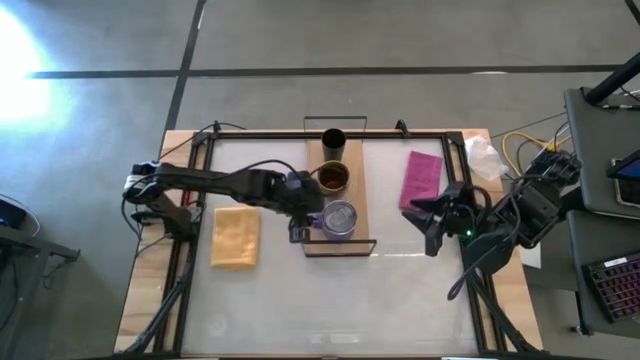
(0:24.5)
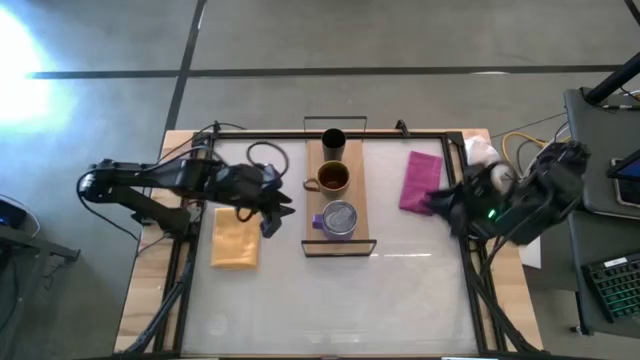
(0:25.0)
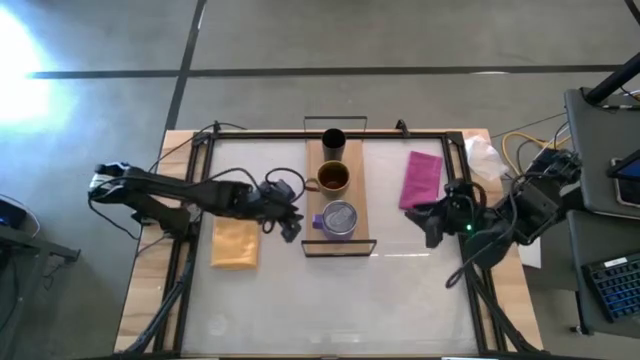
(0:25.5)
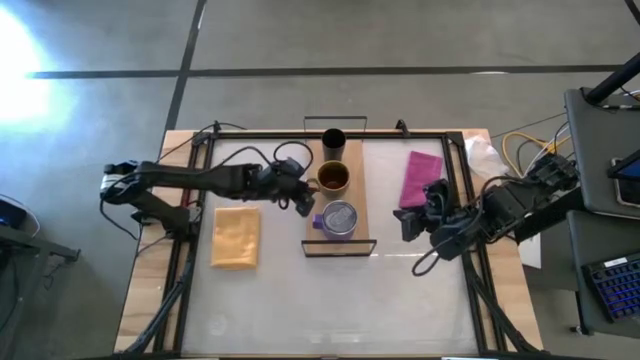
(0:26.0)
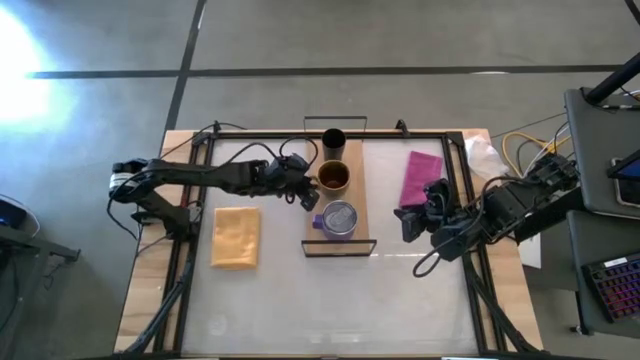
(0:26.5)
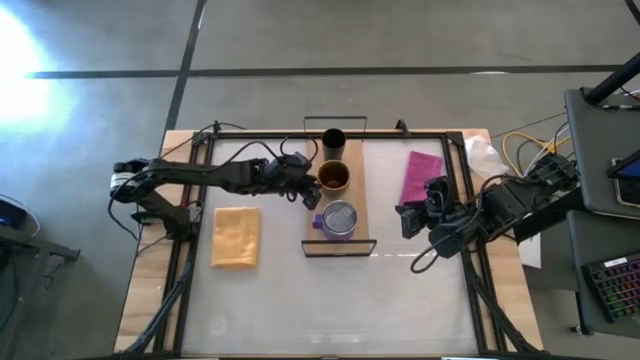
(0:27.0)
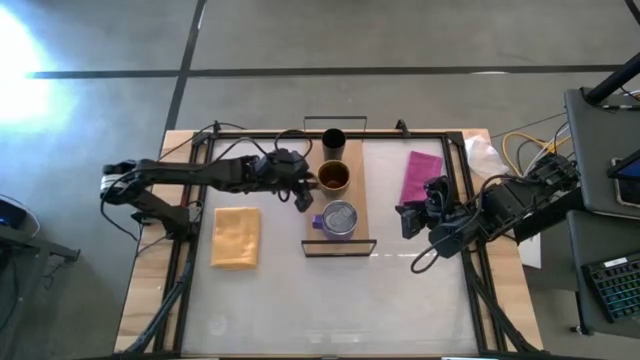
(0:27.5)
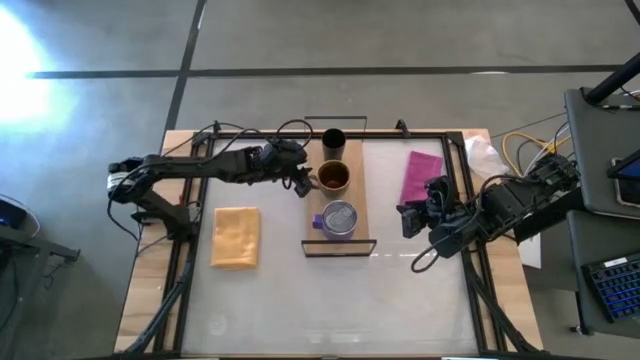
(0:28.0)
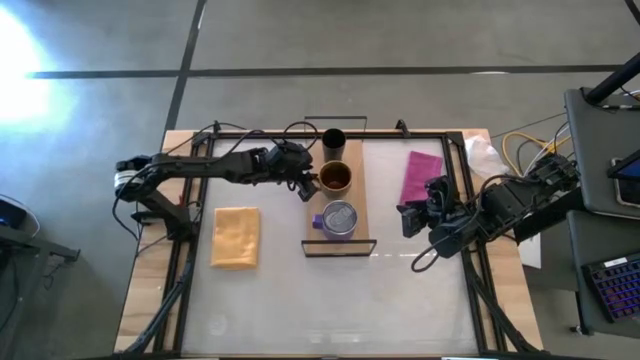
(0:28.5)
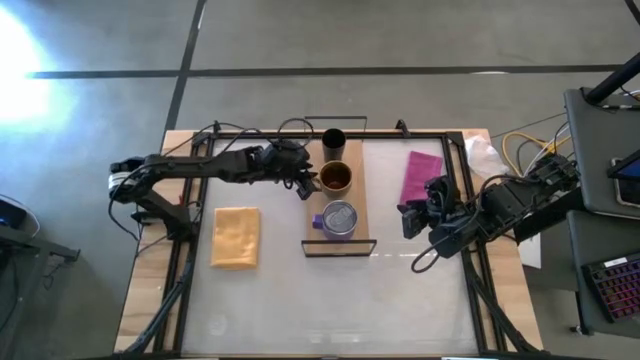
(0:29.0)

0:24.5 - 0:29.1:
Task: Stack small to large cups/mugs on shelf
Adjust the green mug on the shelf

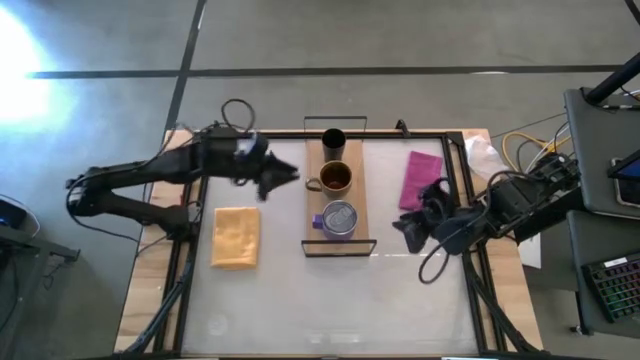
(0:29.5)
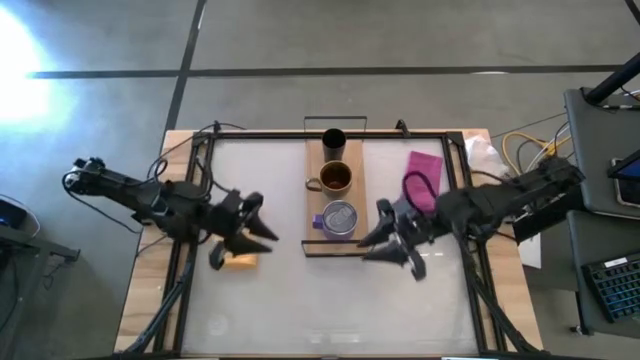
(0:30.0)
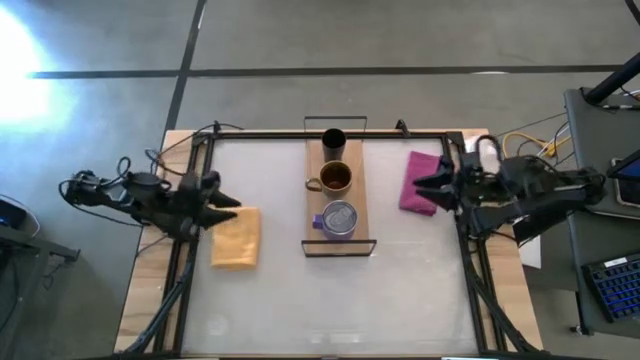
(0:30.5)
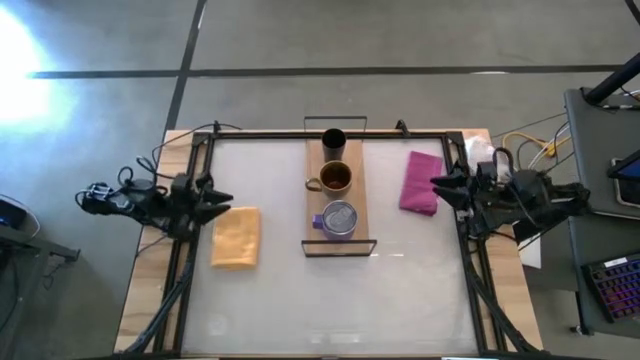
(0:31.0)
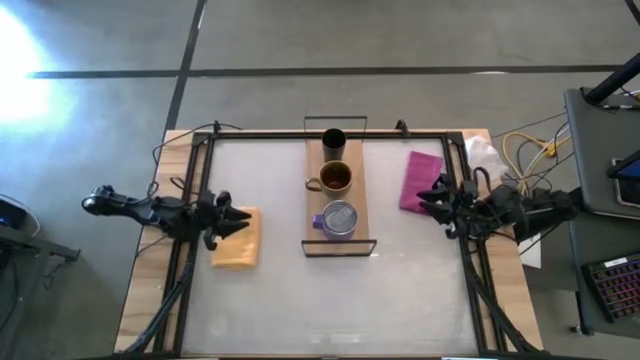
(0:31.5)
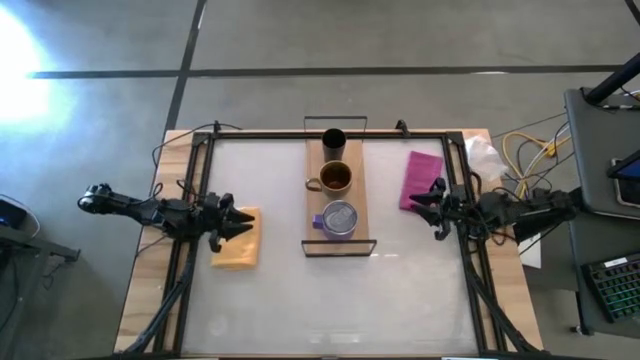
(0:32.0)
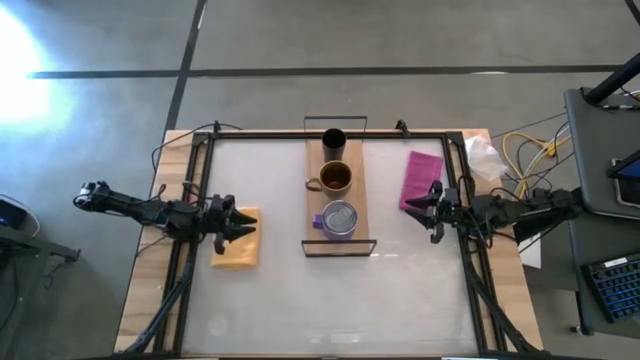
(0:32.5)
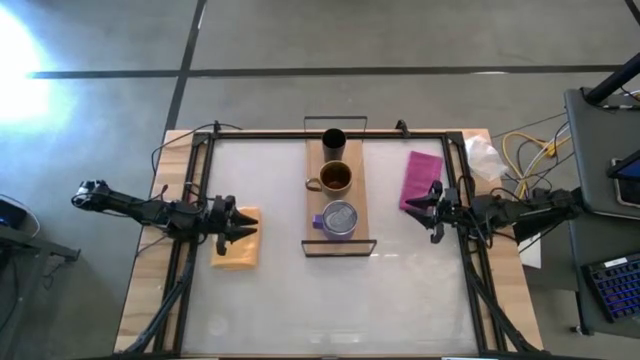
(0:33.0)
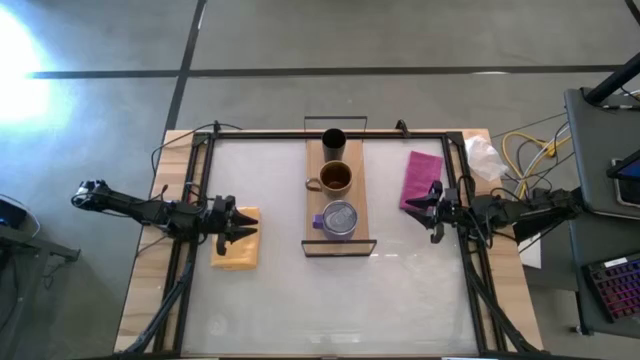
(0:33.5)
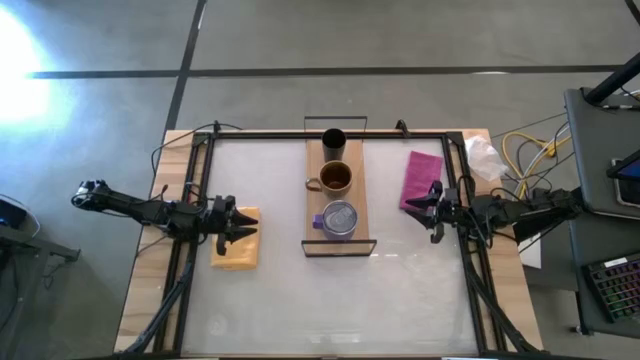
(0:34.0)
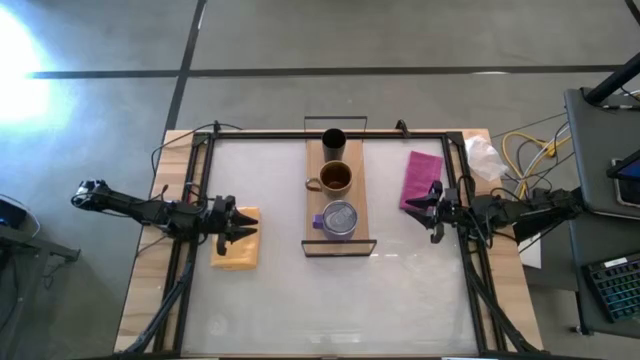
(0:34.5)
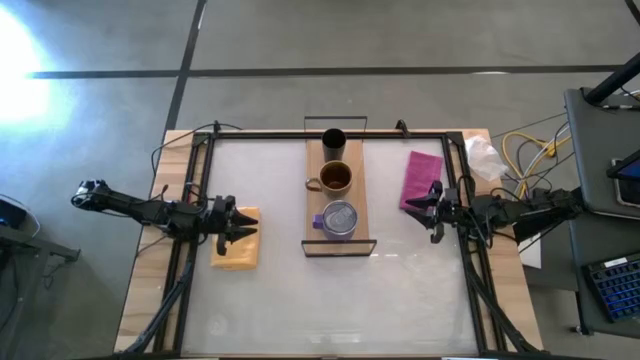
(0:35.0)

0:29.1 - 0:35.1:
Return to Home Position

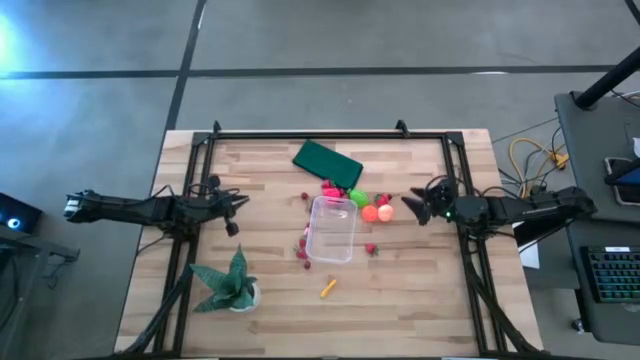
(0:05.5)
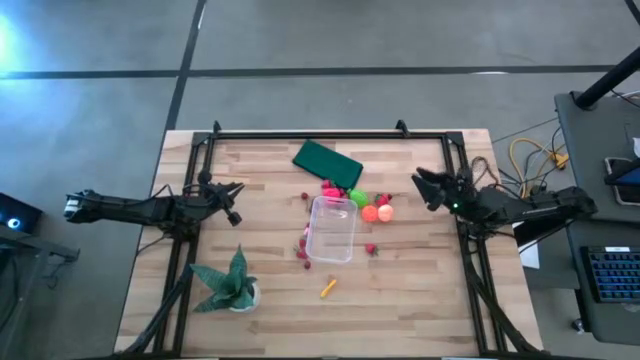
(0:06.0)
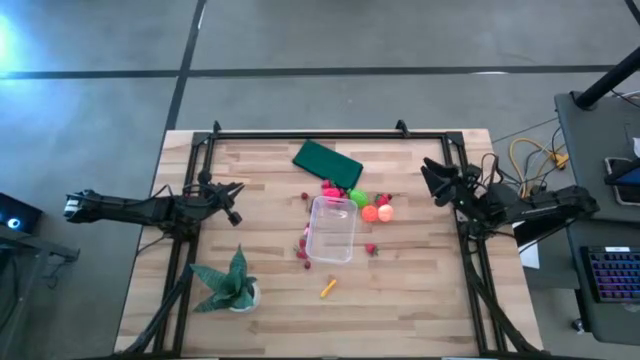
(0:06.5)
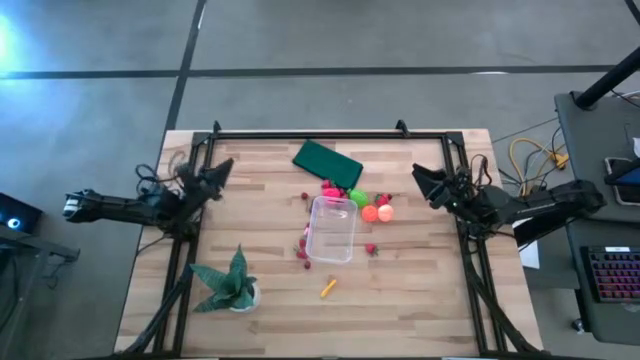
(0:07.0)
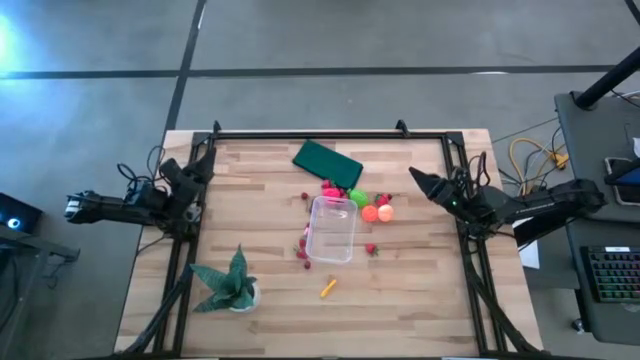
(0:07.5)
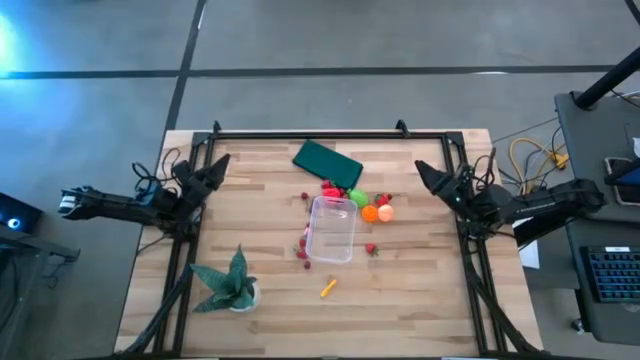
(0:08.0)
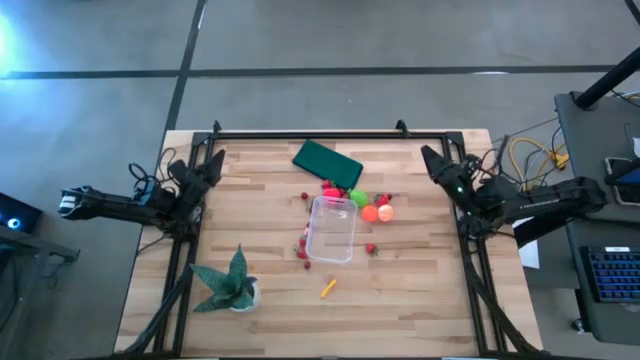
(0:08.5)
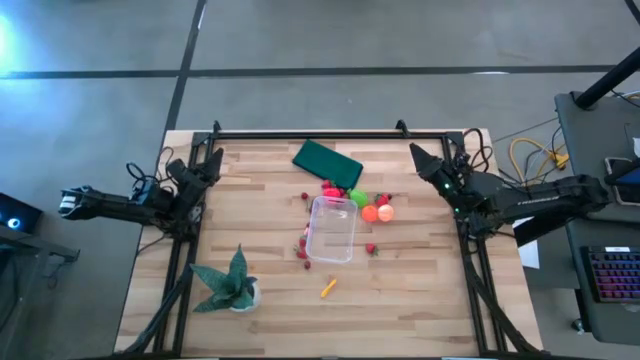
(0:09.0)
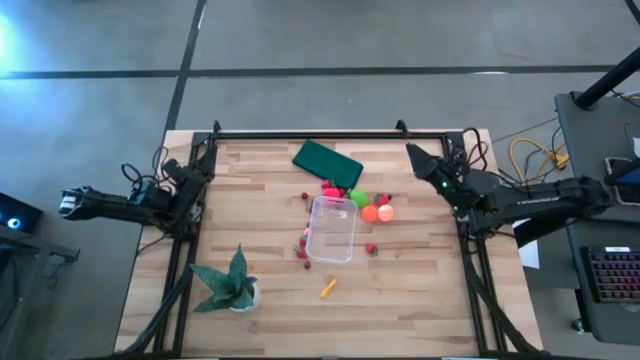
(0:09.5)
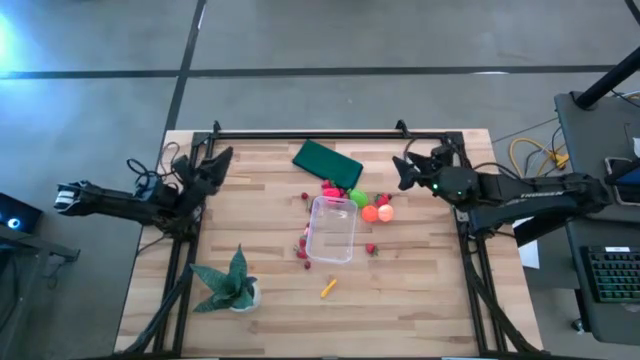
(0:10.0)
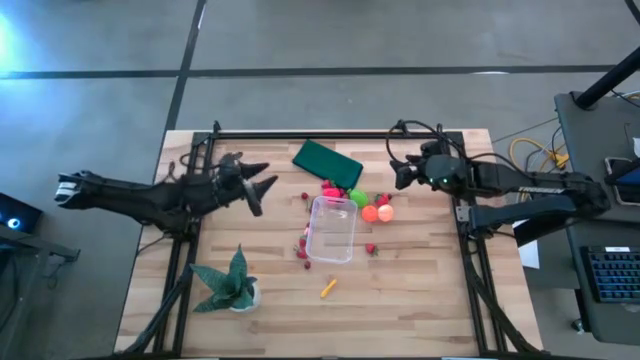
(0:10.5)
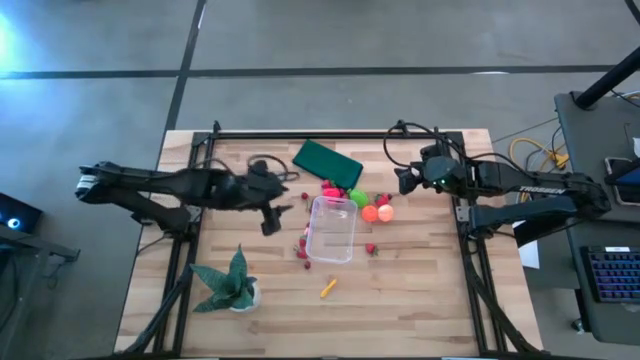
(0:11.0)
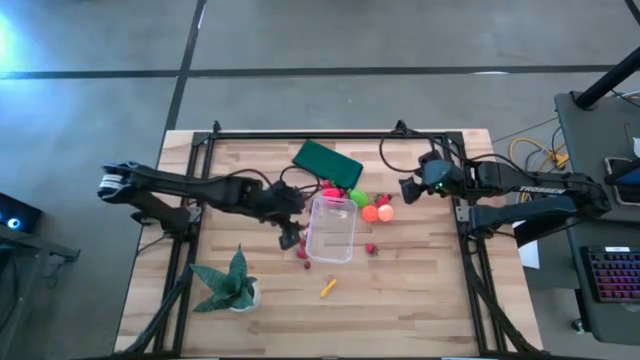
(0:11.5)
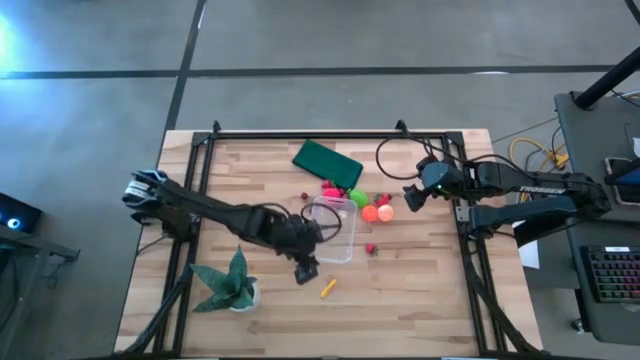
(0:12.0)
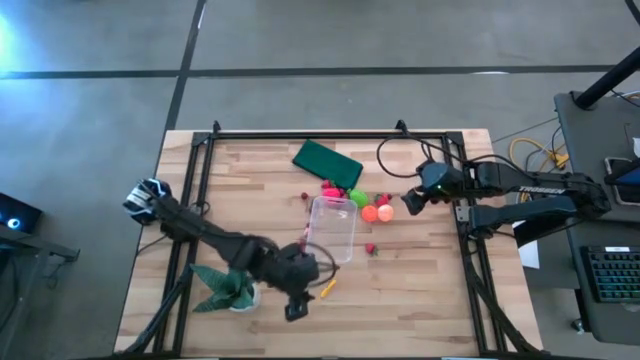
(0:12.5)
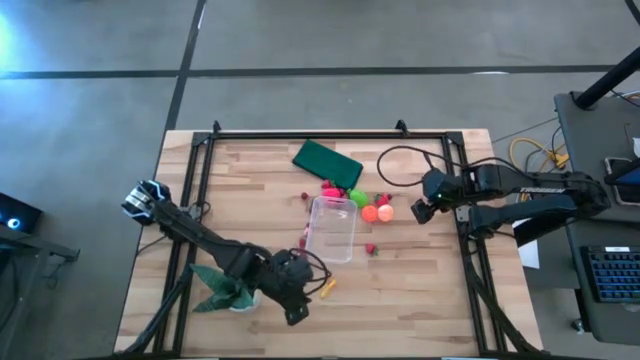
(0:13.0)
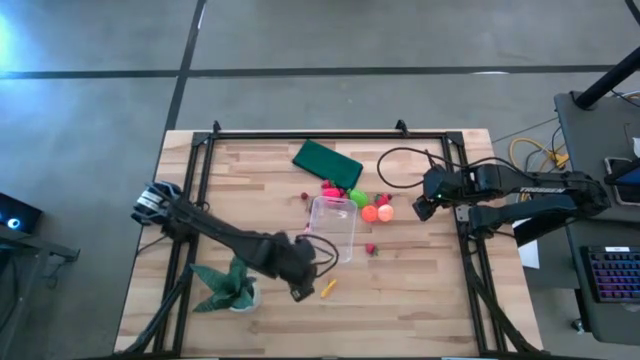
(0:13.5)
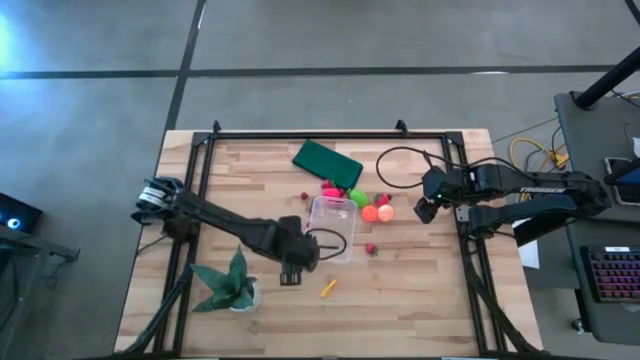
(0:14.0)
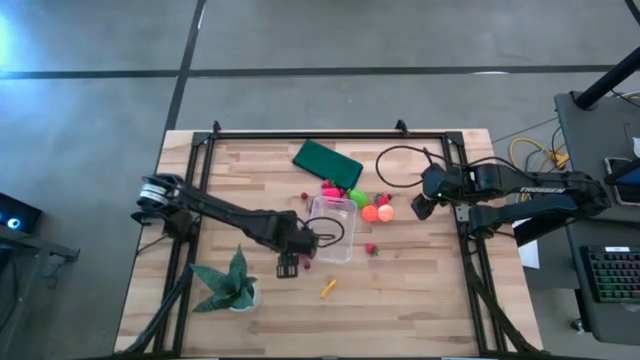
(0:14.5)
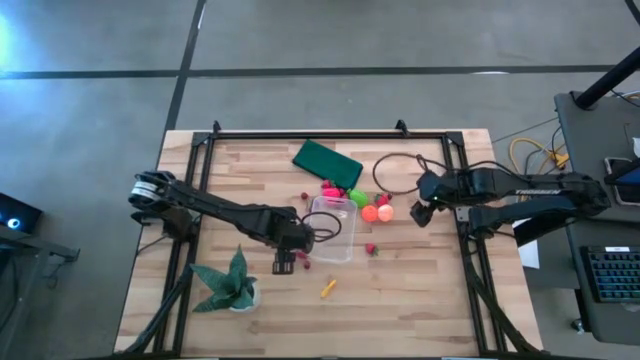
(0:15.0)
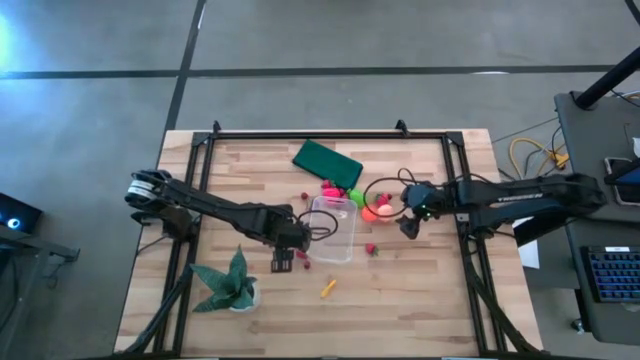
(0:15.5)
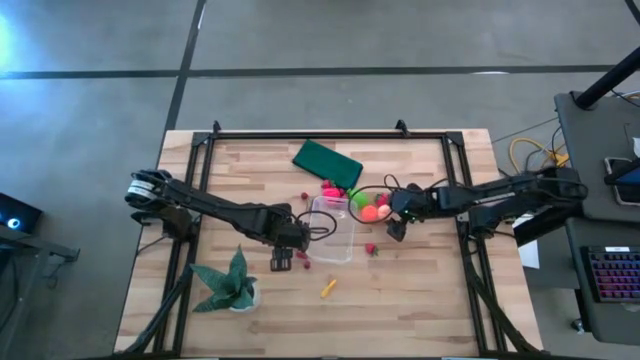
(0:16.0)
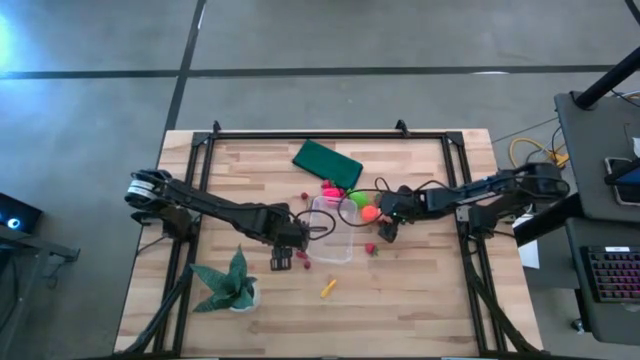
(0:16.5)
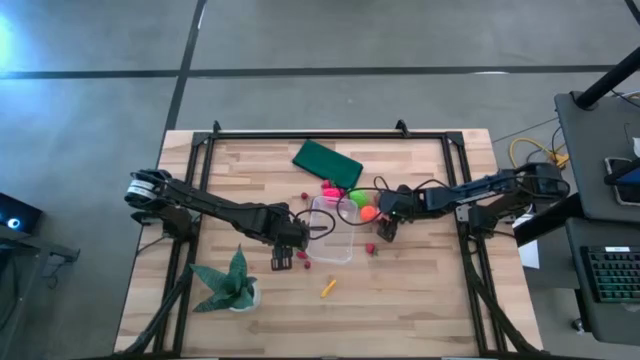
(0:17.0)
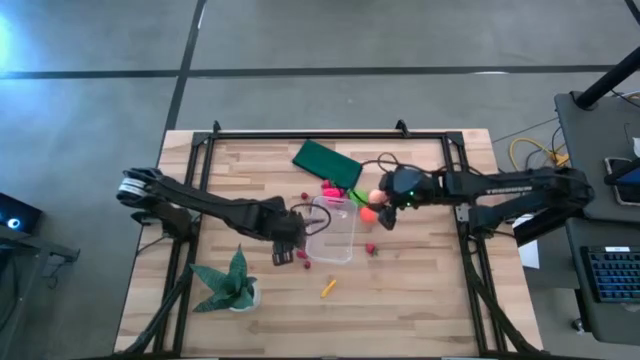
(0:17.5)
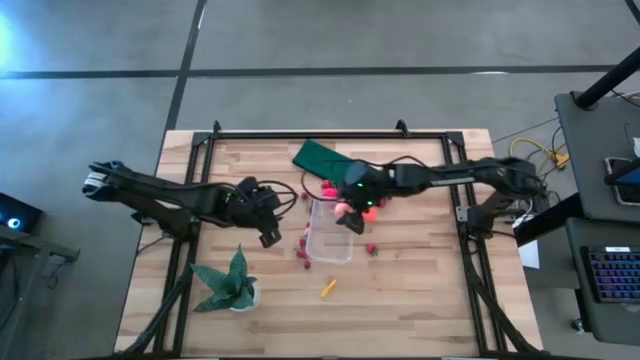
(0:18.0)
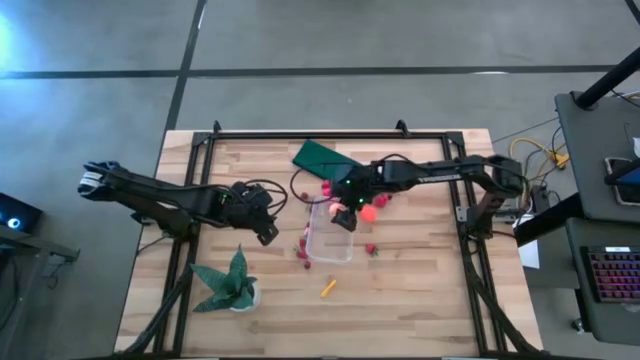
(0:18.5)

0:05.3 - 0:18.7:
Task: Pick and placing Produce into tupperware
Put the pink peach into the transparent bin
